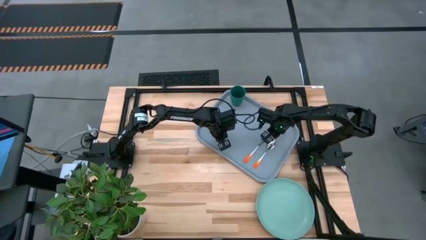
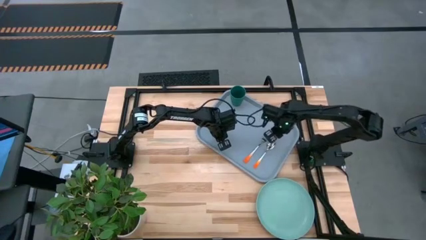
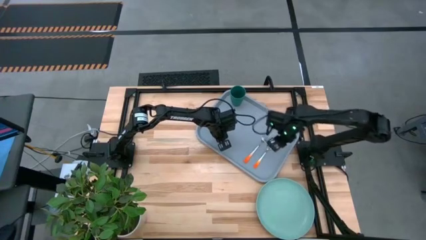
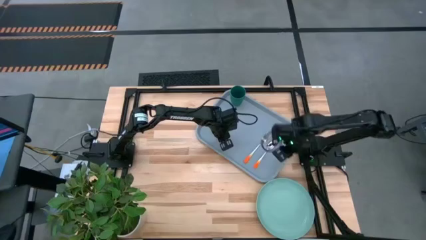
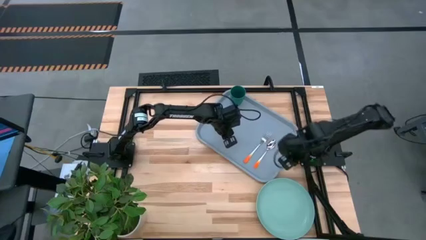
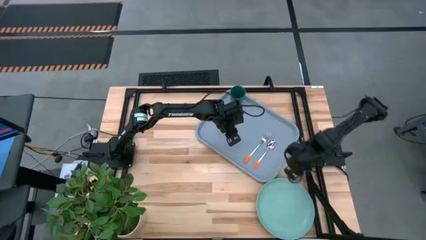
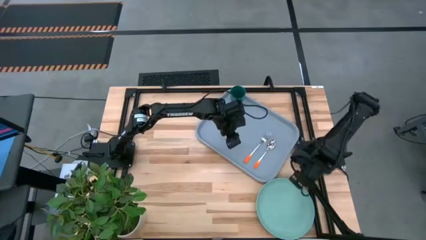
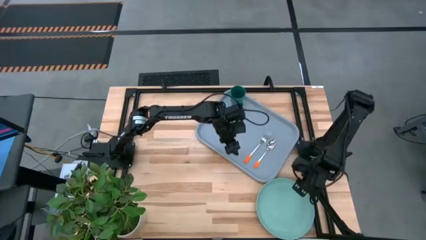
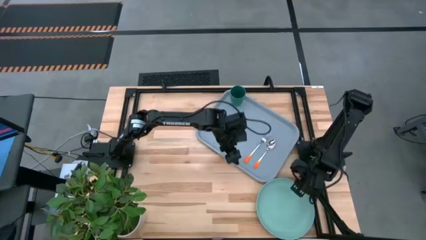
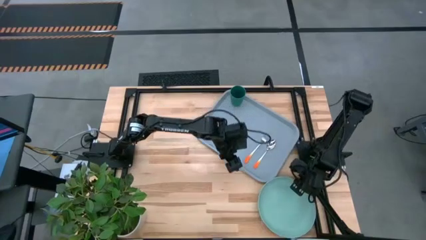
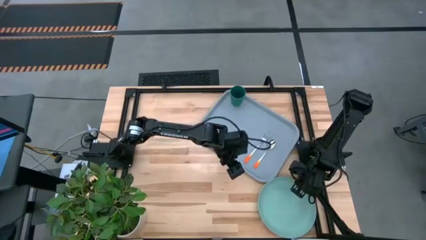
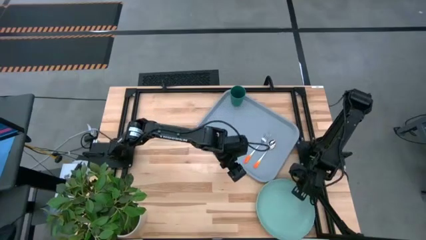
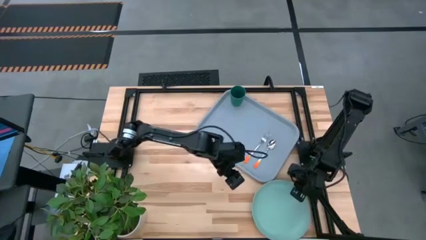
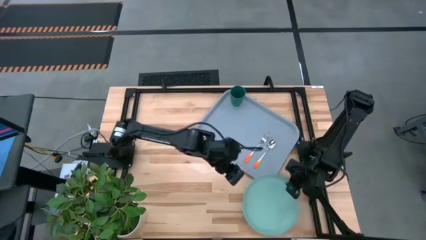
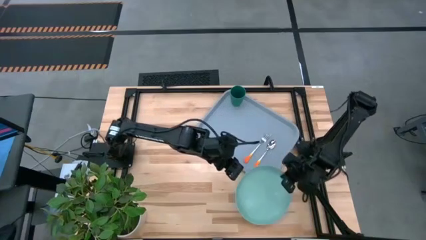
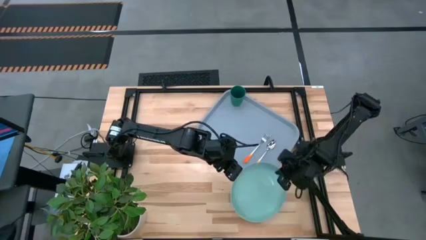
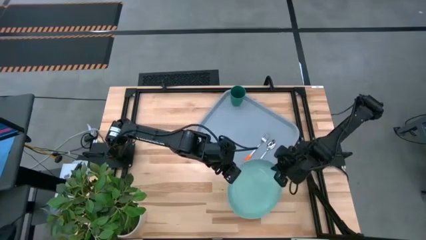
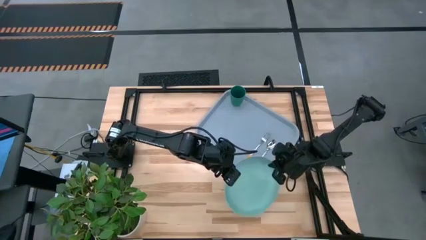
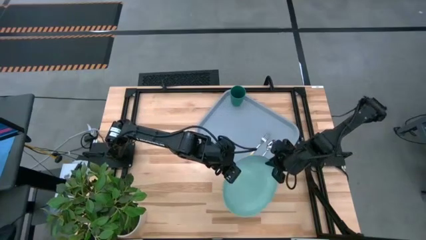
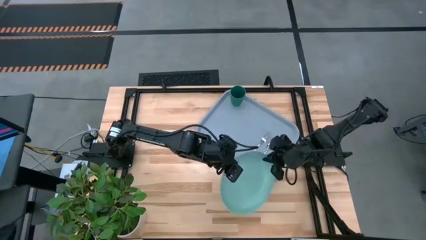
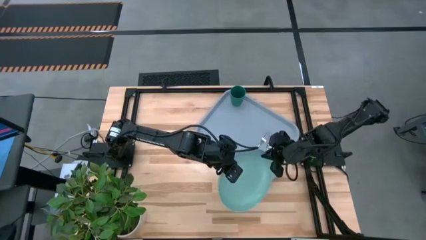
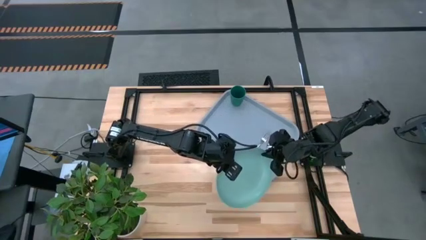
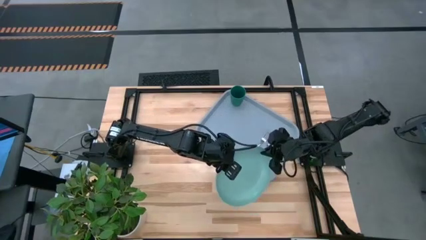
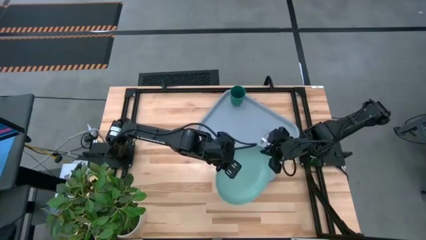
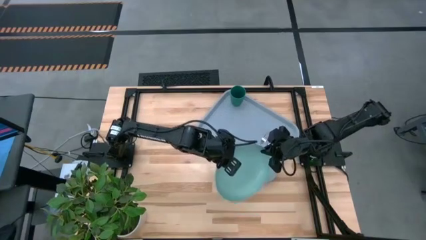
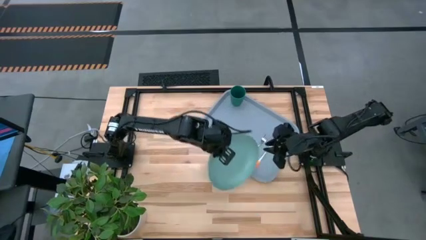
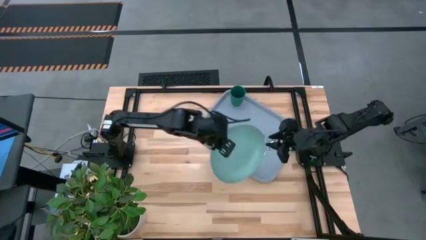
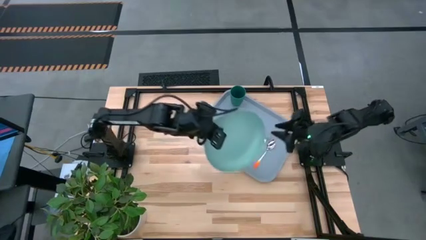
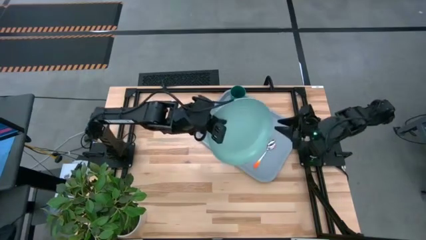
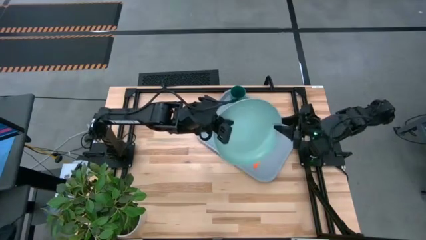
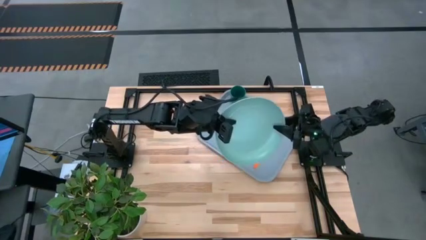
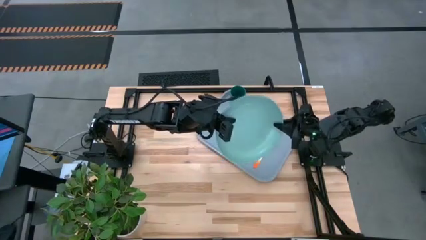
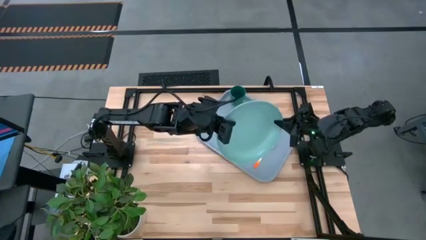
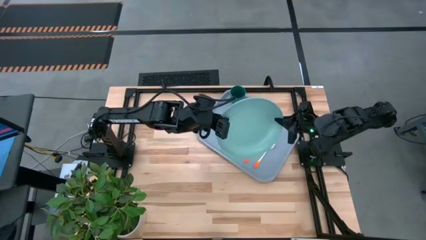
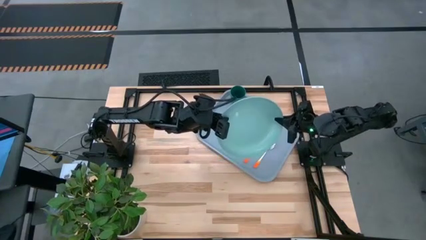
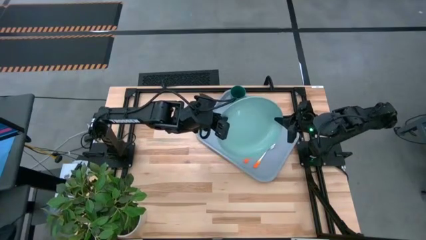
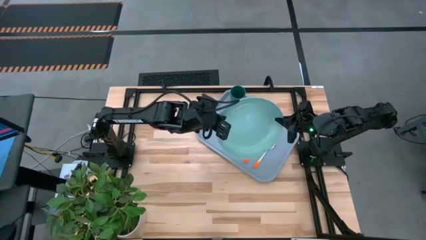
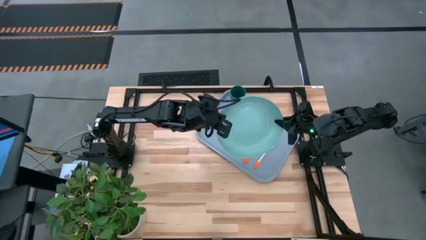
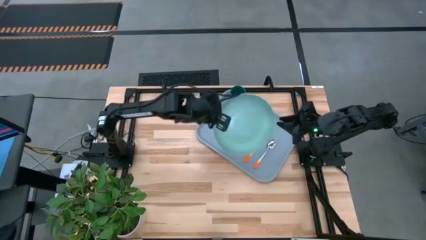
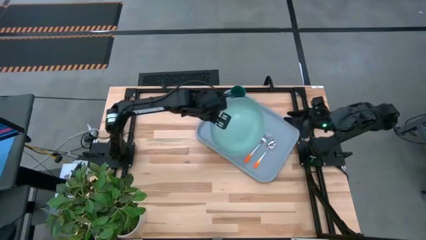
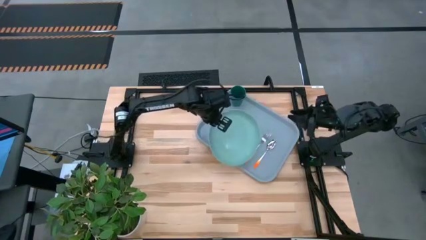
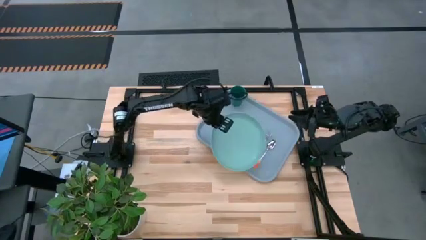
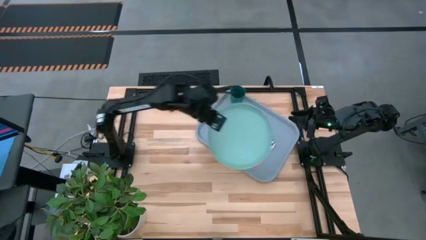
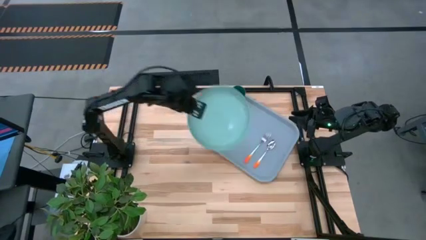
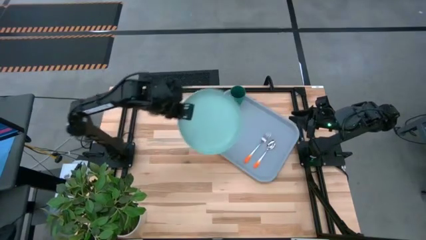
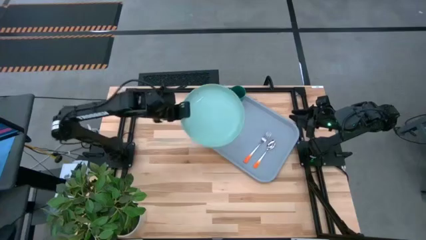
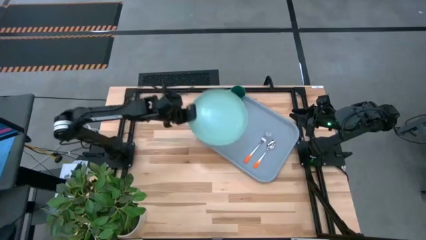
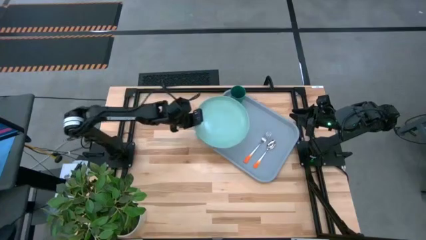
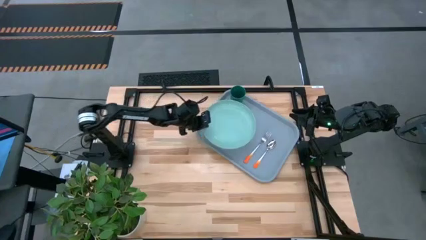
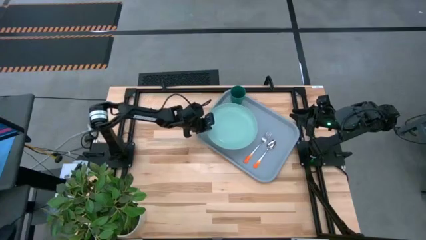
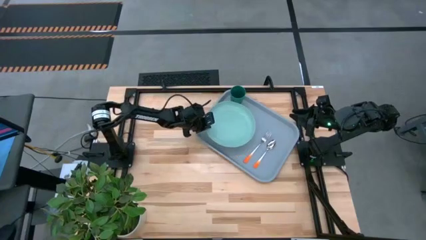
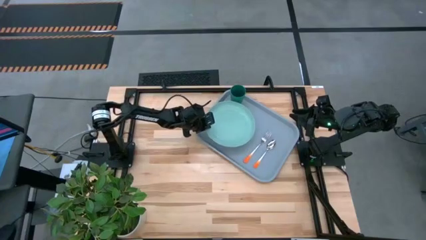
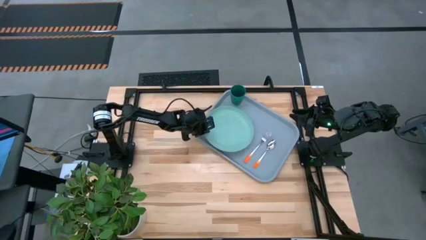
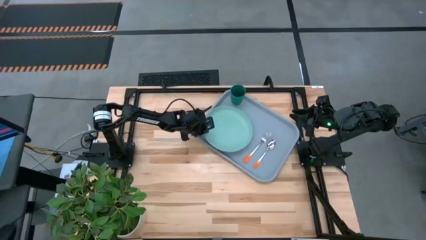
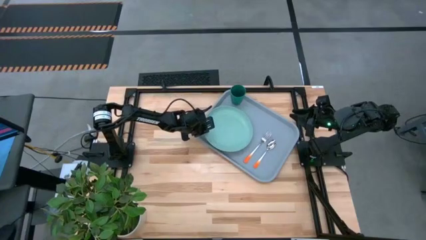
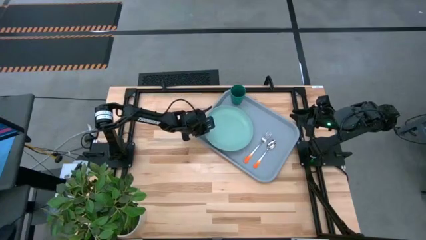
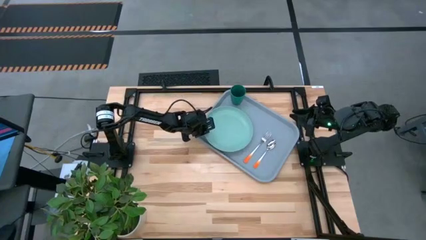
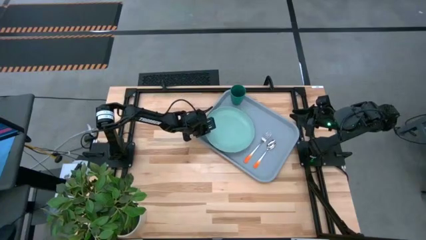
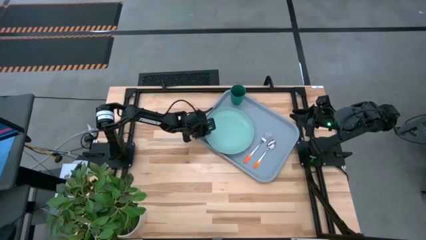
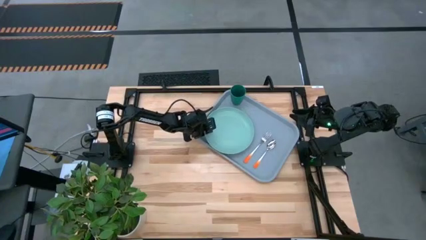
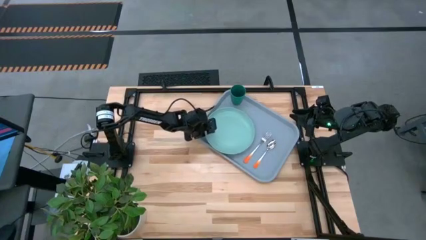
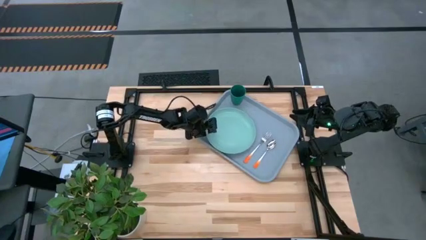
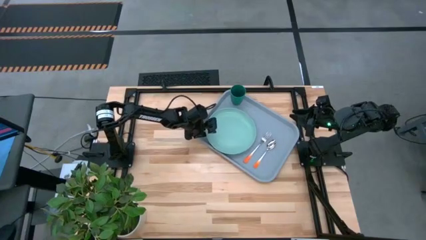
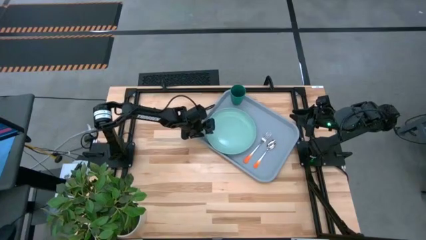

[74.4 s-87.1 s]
Task: Pick and place plate/cup/fork/spoon on tray
Put the light green plate on the blue tray

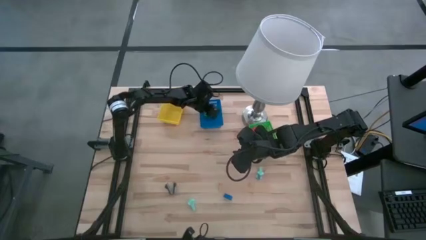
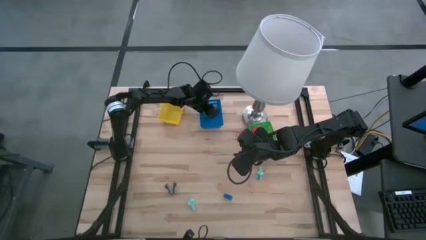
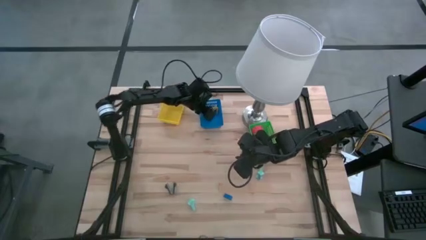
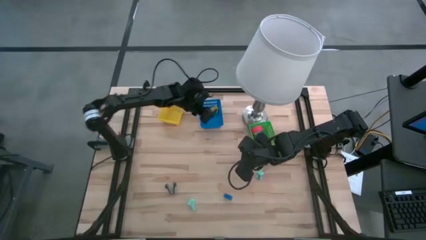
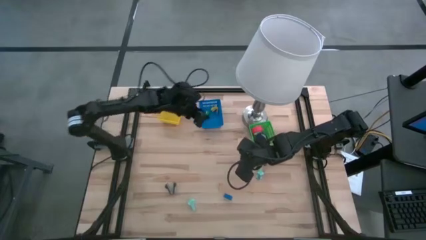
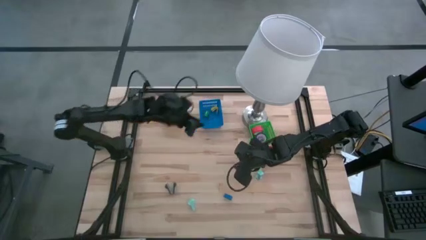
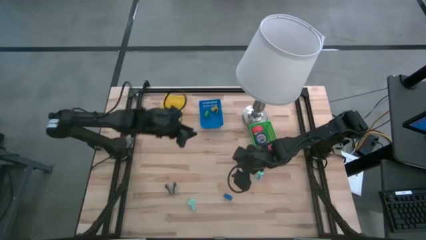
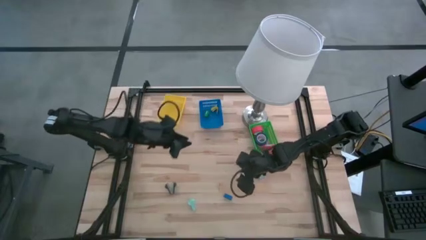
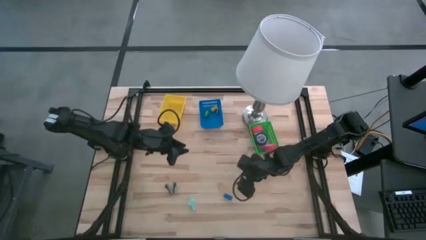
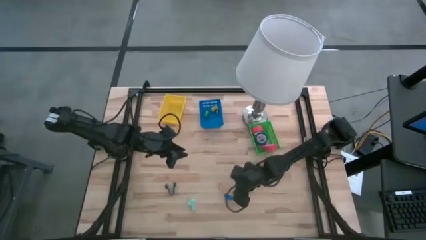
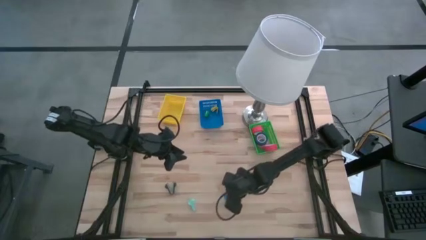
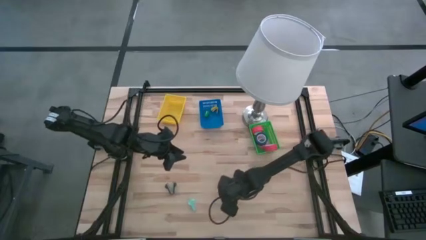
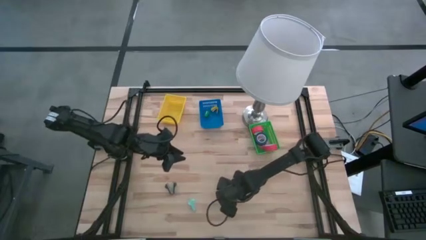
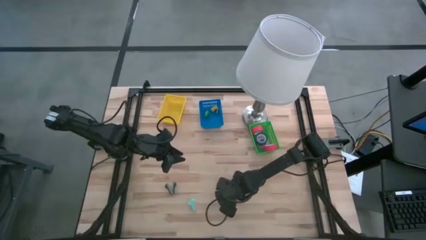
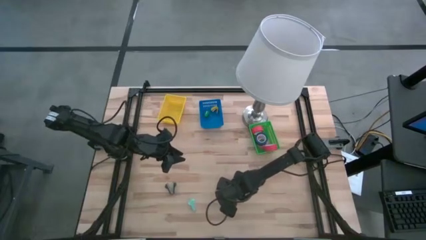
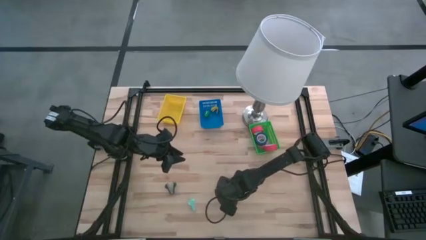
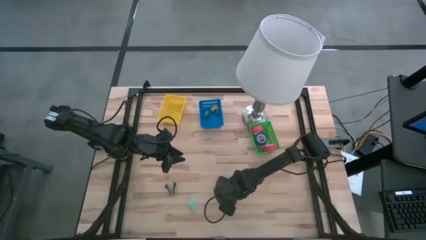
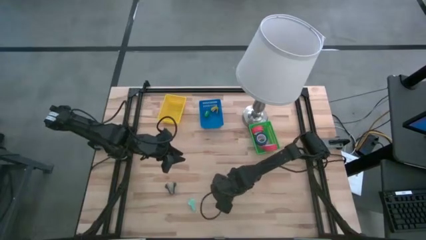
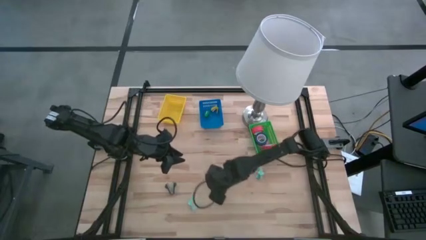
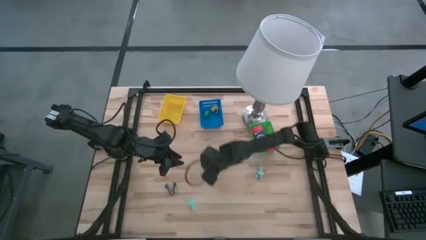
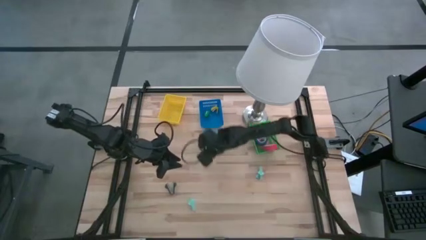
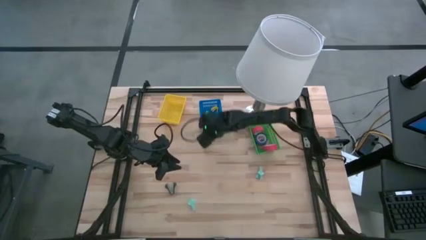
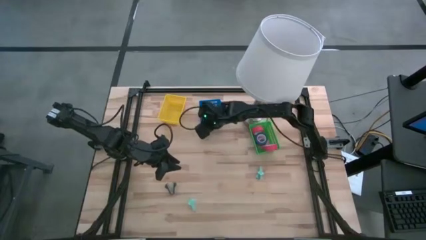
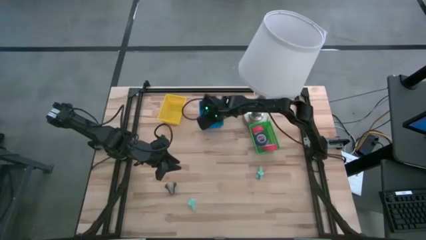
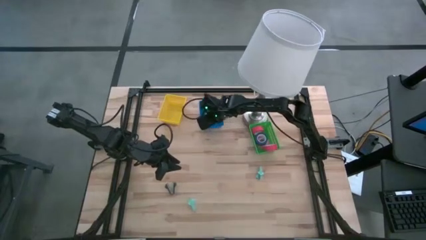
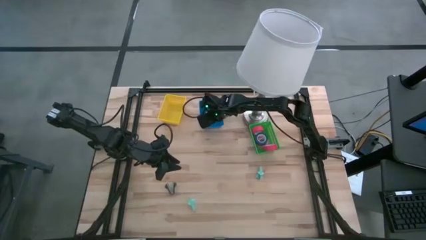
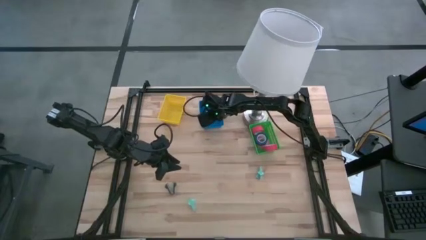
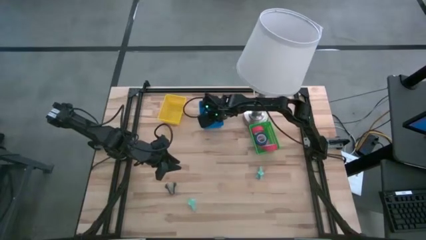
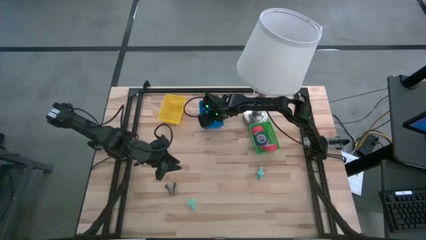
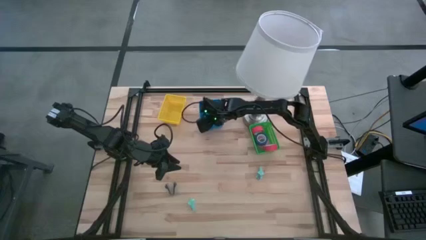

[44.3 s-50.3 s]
Task: Pick and place Stapler, Stapler remover, tape
Put the blue small stapler into the blue bin
